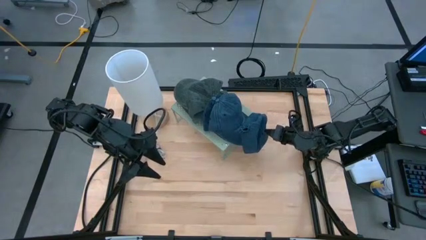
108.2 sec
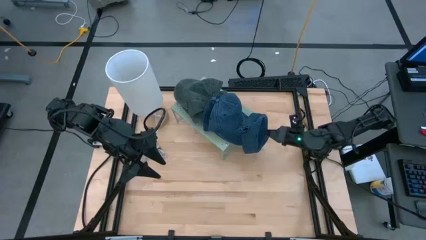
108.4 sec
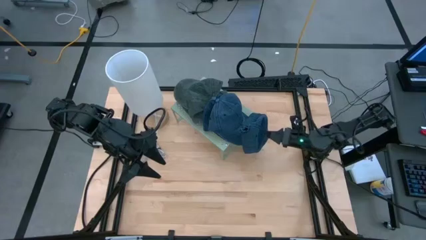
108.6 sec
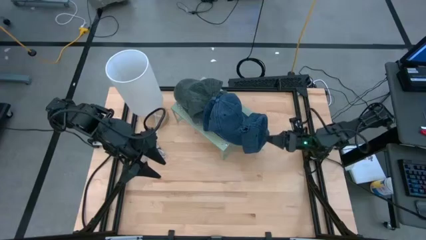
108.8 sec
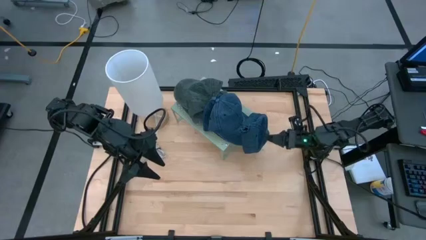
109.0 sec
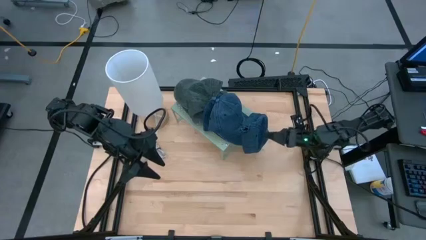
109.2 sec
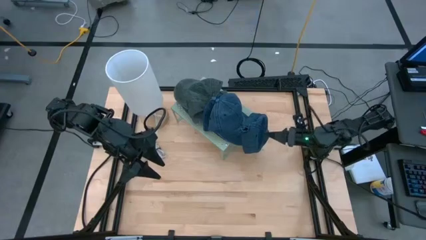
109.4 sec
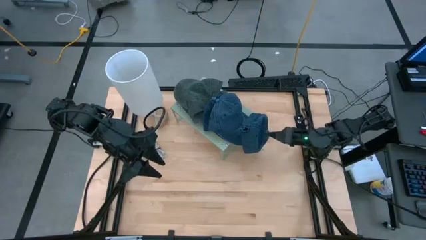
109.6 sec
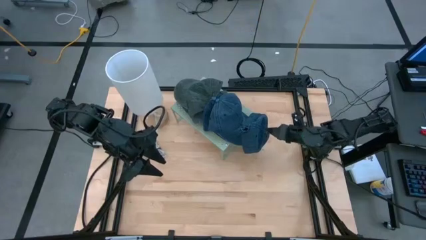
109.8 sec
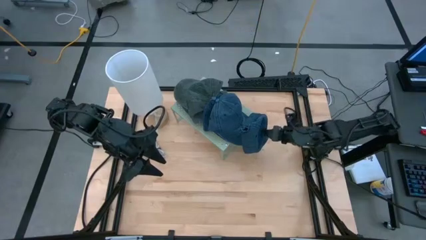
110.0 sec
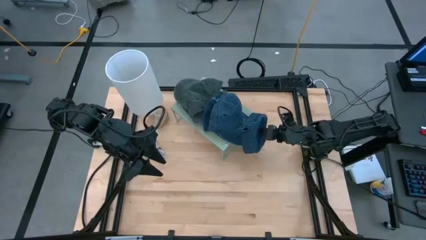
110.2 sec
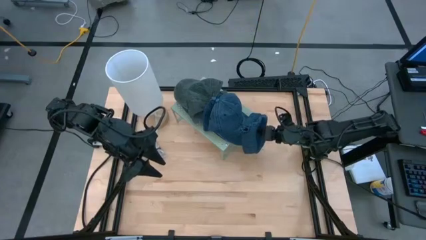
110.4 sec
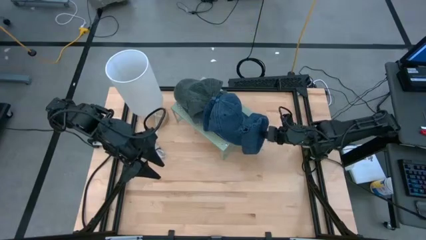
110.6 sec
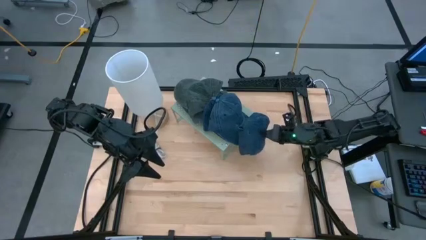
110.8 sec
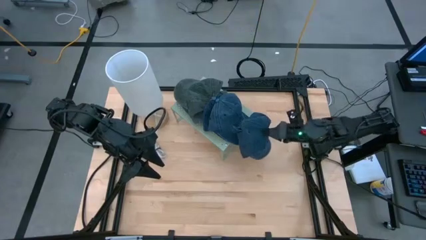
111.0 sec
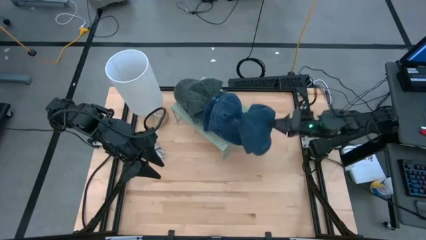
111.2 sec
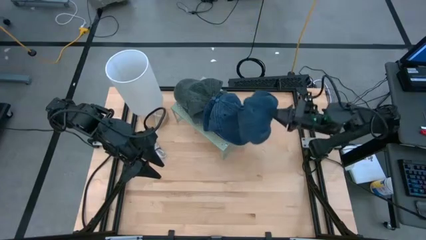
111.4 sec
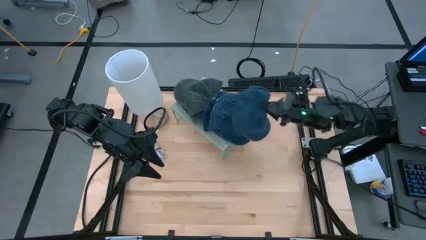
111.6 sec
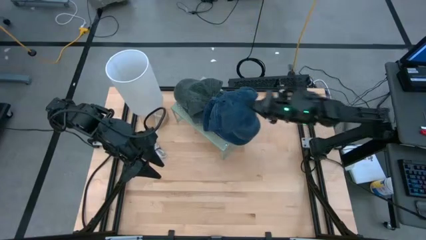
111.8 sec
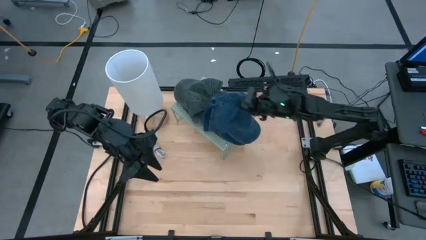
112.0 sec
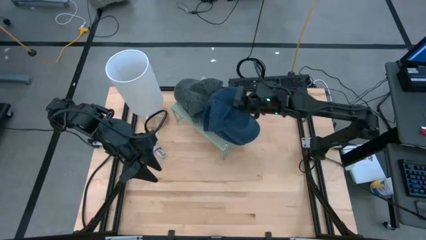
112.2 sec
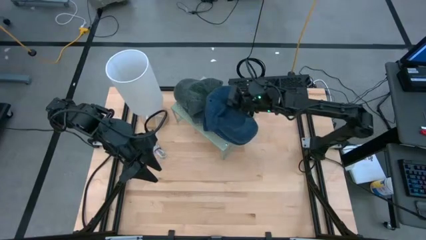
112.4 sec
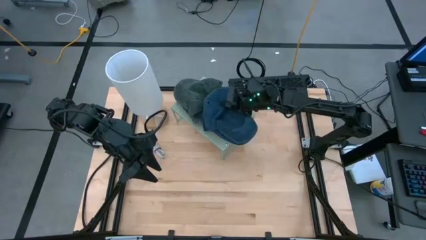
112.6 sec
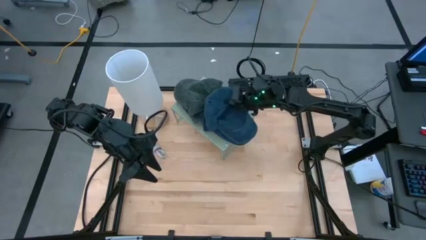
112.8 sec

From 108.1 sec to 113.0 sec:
Task: Pick & Place hat
Stack the blue cap on top of the stacked blue caps on the shelf

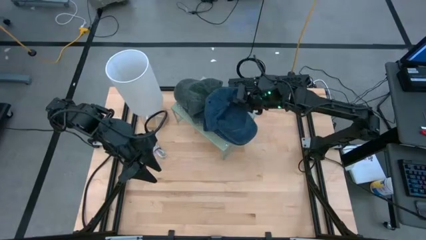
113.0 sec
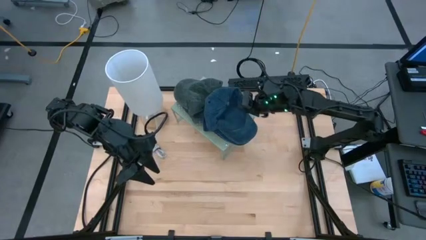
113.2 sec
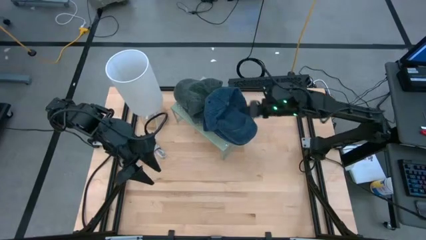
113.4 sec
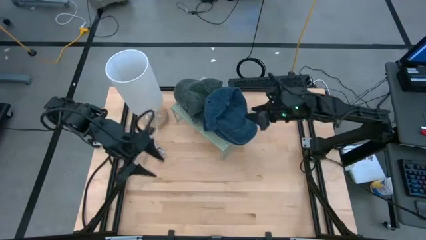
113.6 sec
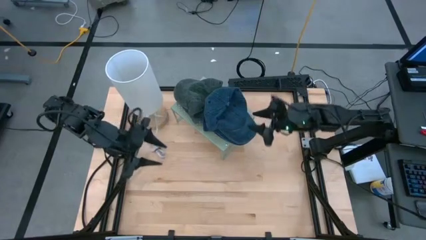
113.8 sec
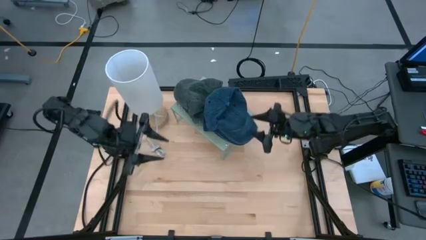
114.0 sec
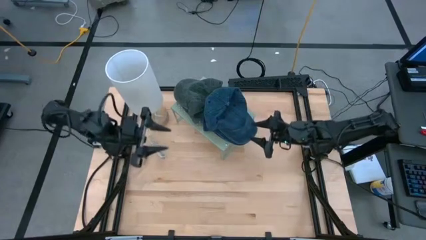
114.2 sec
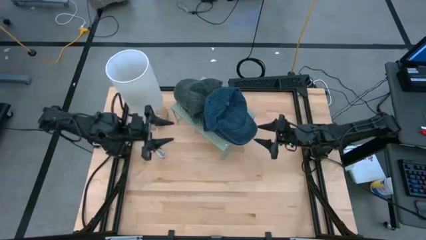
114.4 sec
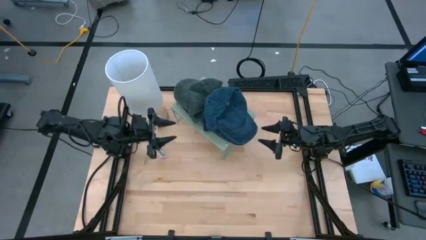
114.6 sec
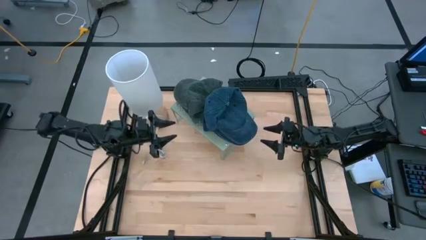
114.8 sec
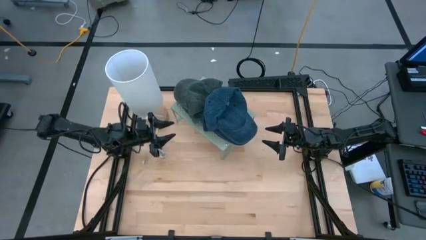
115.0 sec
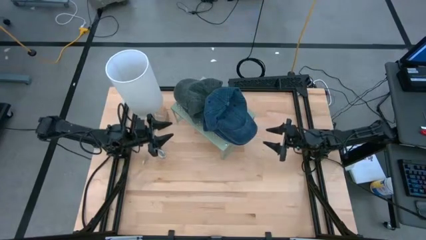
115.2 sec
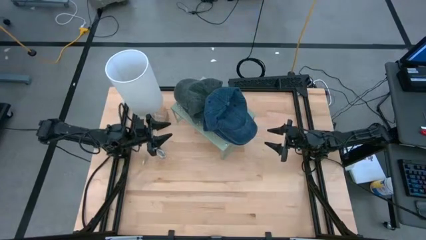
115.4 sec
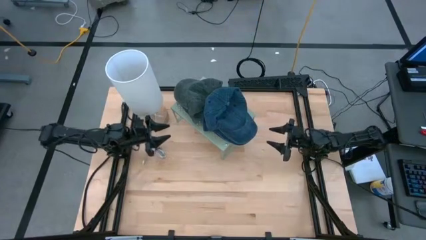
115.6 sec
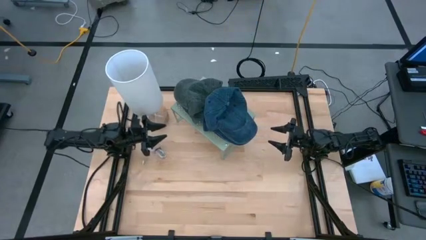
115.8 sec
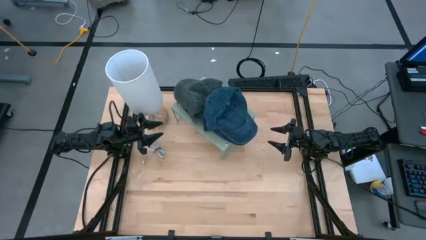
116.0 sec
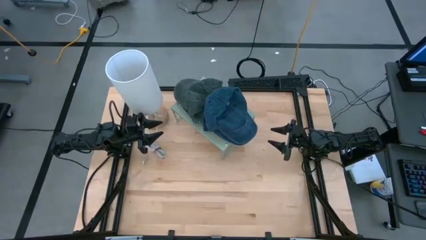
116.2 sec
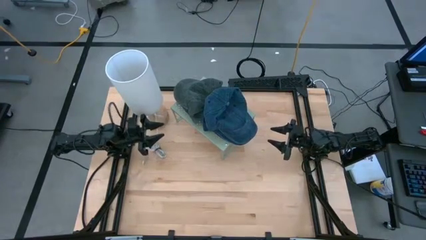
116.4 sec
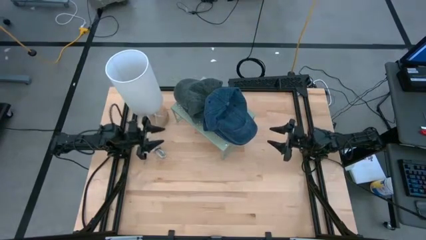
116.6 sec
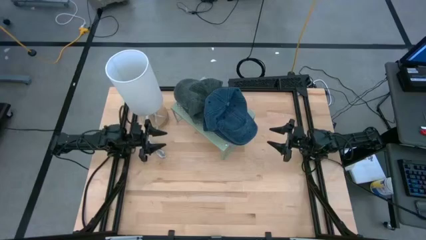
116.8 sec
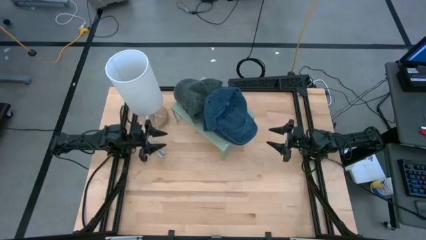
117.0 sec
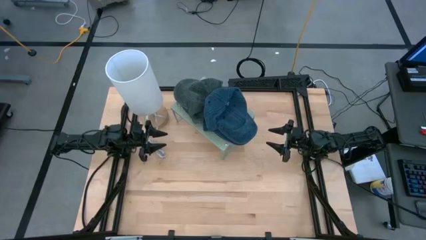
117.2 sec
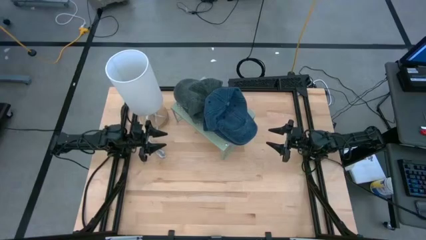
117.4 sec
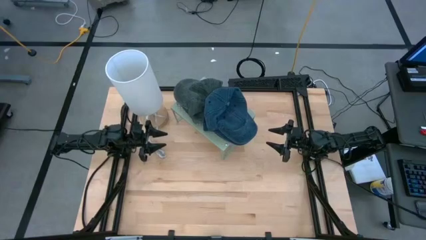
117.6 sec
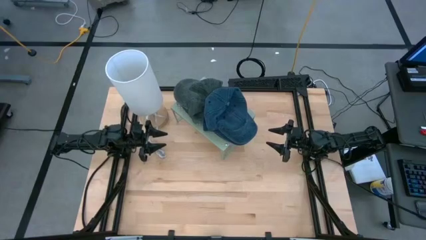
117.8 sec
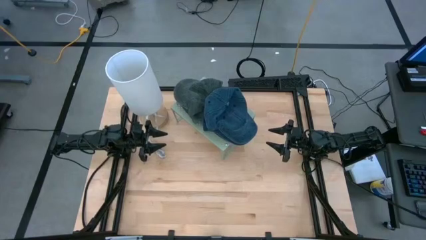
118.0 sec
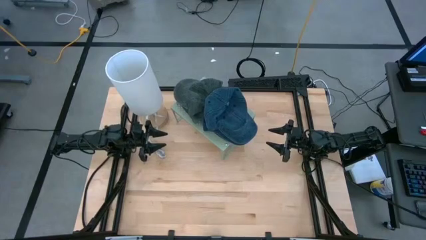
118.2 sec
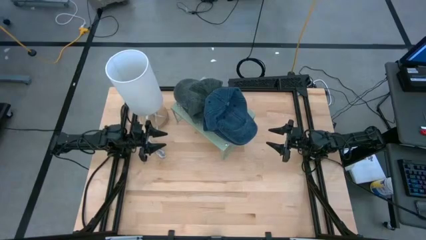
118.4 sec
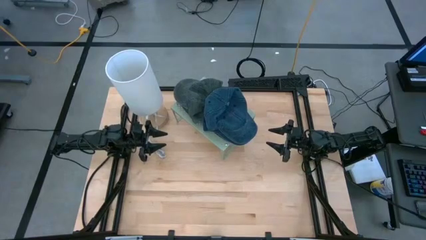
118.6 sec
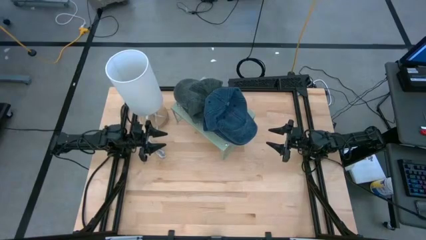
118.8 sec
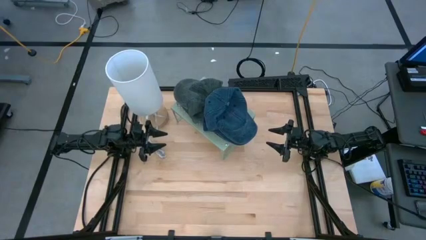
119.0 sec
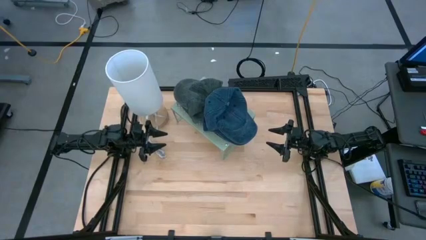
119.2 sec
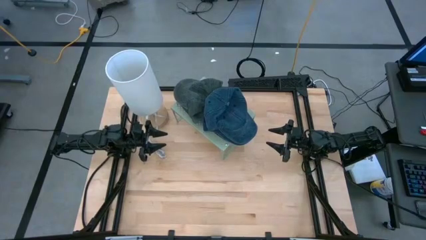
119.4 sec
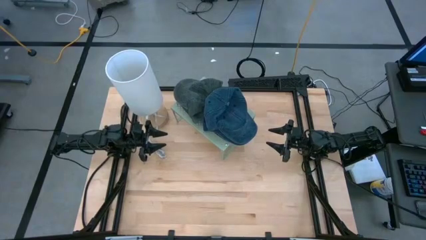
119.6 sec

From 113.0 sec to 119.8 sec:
Return to Home Position

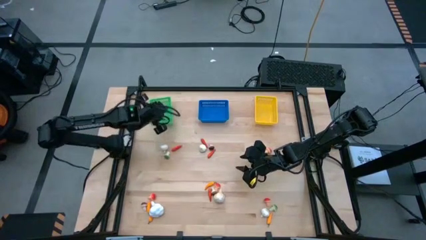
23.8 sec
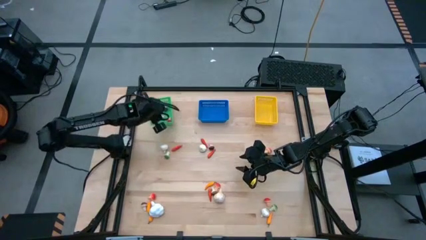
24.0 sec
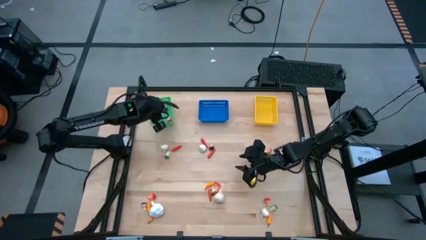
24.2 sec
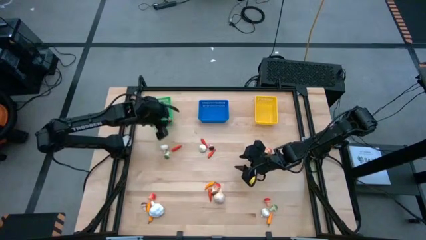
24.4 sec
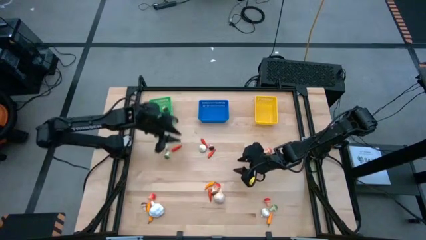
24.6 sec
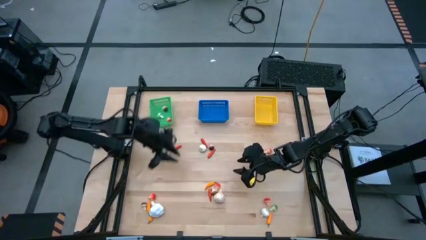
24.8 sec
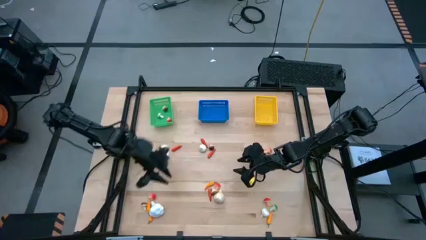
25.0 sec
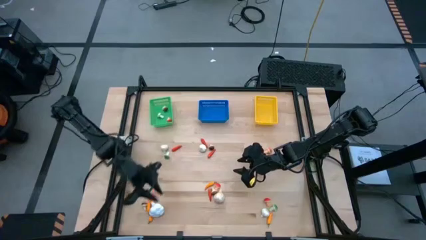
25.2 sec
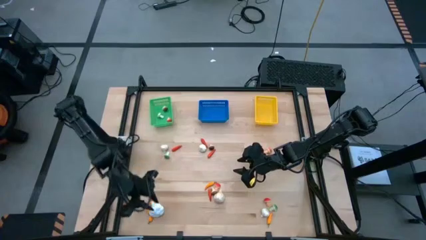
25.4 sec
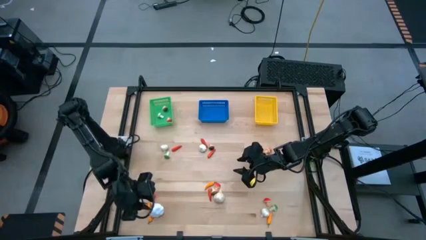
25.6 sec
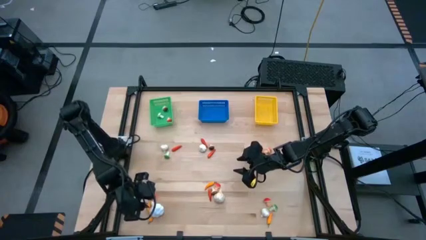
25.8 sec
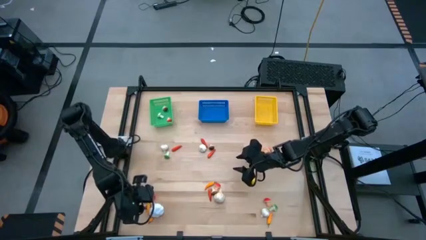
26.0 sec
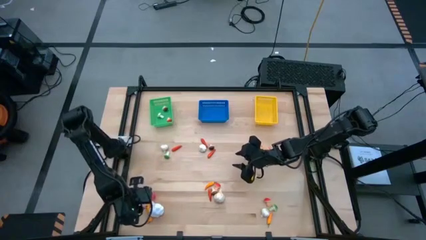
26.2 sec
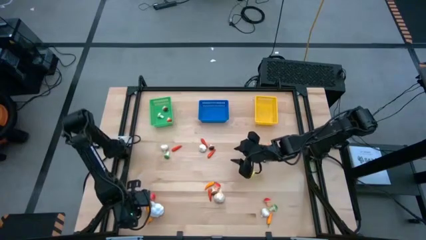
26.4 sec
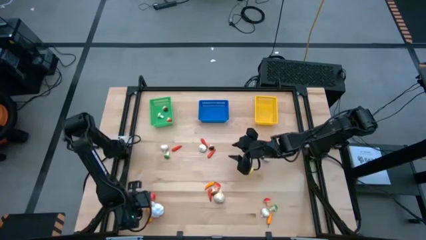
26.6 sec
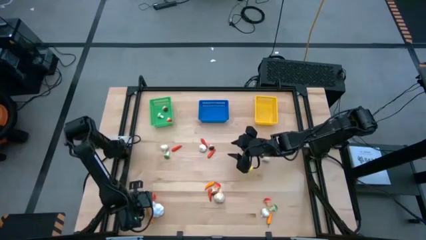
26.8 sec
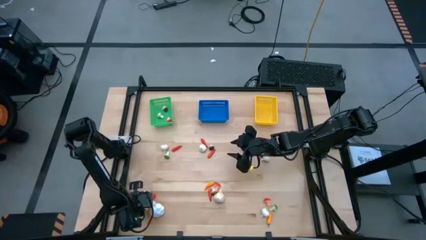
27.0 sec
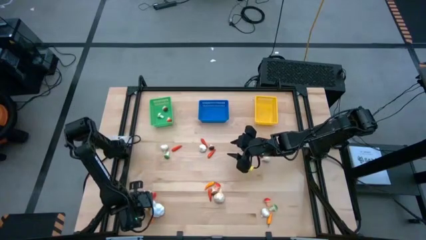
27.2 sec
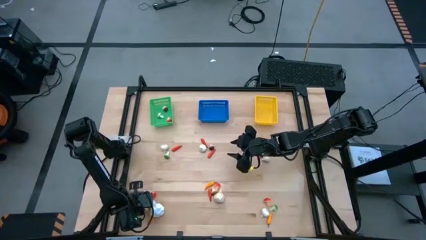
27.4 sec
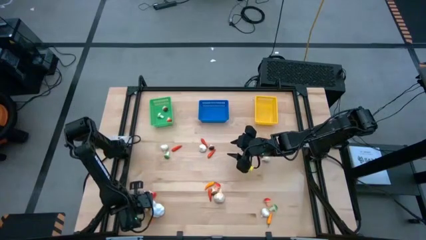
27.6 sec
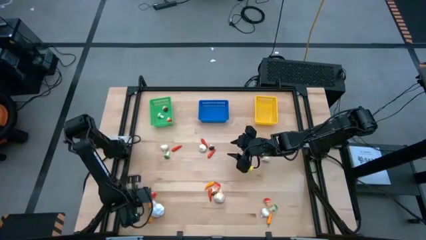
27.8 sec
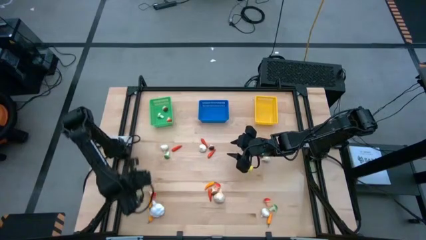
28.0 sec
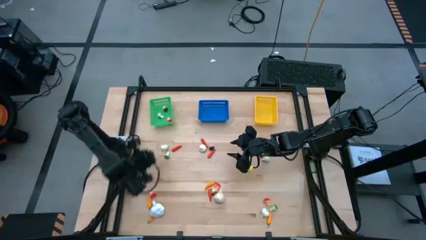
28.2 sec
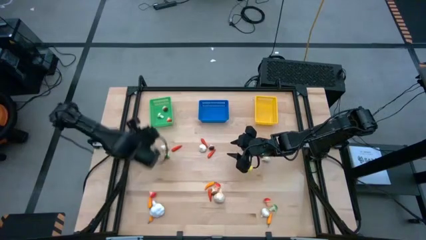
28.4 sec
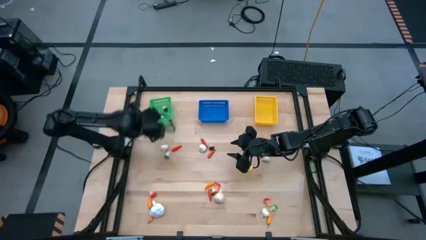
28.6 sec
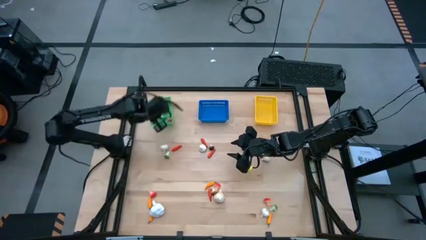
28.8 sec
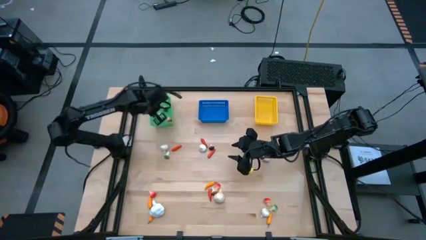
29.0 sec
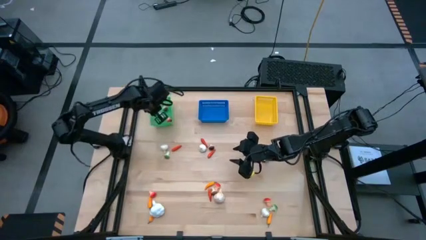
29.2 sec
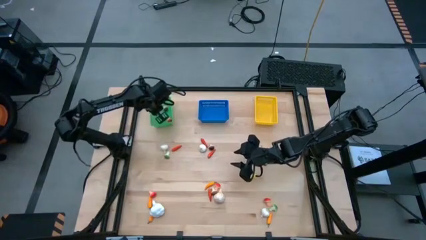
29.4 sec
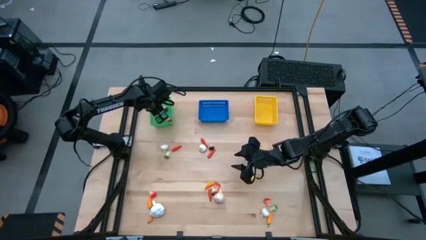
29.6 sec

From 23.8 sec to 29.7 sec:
Task: Sort produce into baskets
Put the brown mushroom into the green bin
